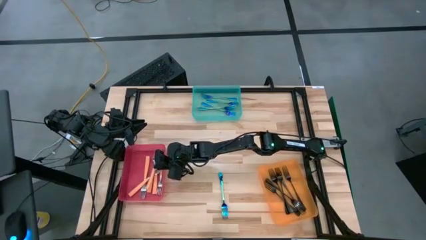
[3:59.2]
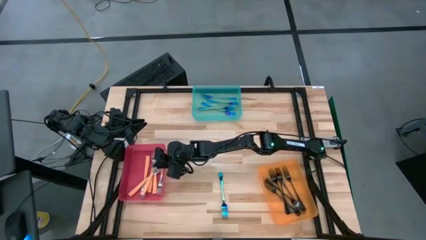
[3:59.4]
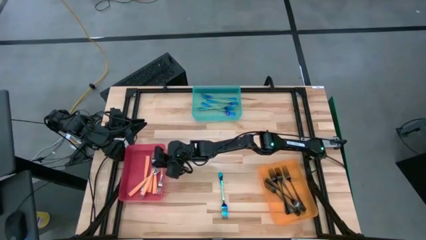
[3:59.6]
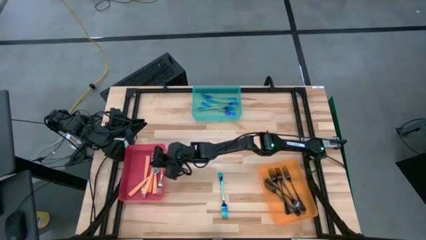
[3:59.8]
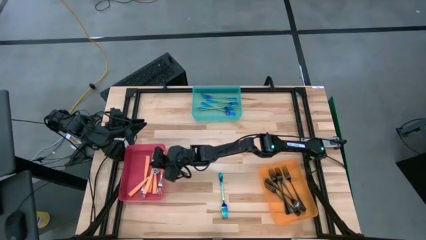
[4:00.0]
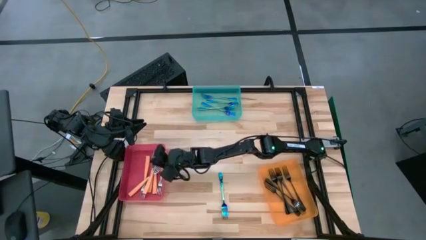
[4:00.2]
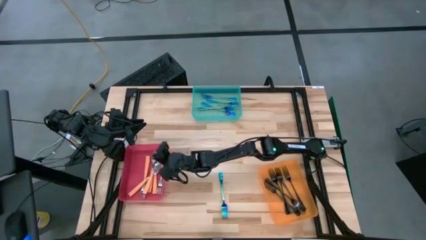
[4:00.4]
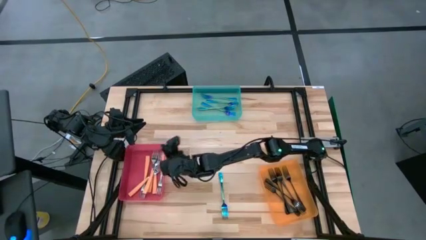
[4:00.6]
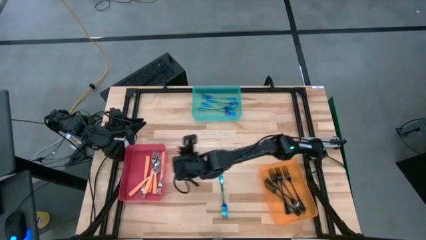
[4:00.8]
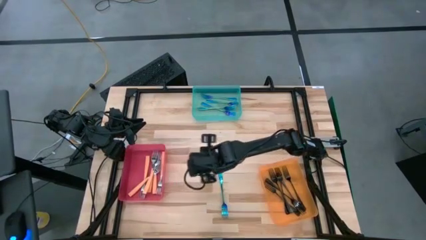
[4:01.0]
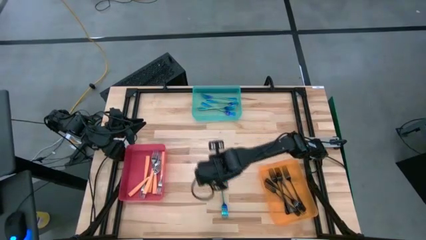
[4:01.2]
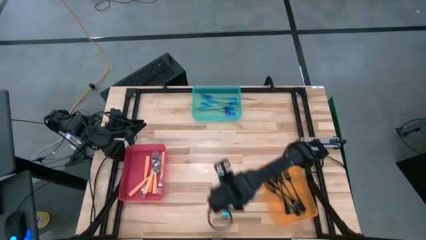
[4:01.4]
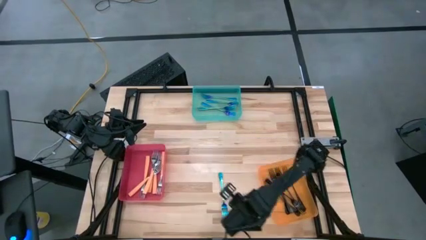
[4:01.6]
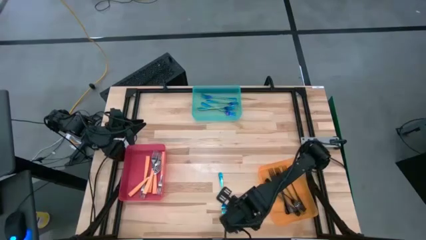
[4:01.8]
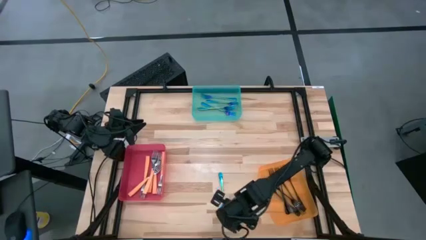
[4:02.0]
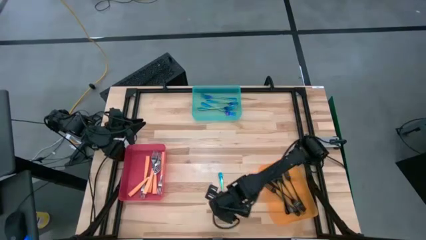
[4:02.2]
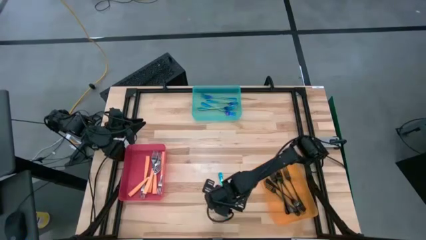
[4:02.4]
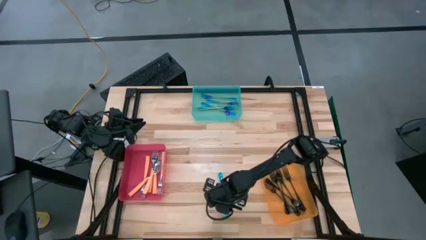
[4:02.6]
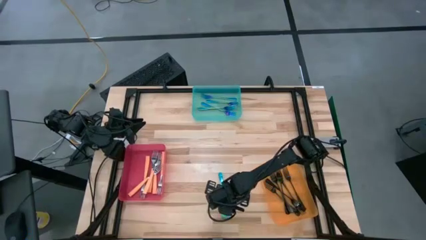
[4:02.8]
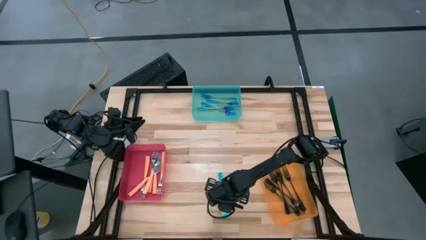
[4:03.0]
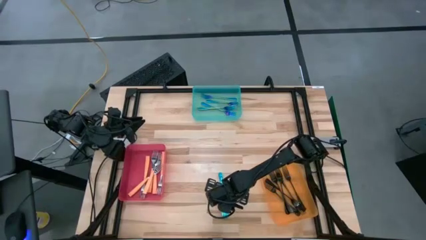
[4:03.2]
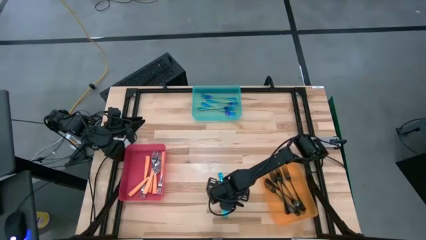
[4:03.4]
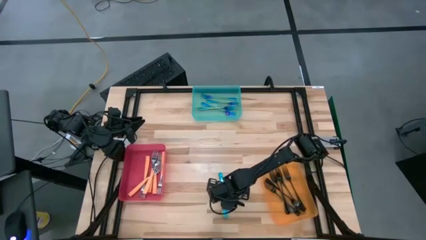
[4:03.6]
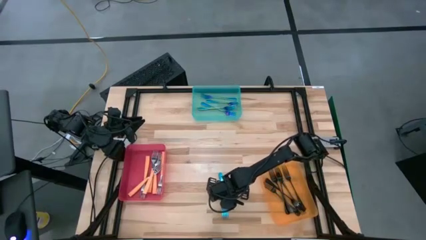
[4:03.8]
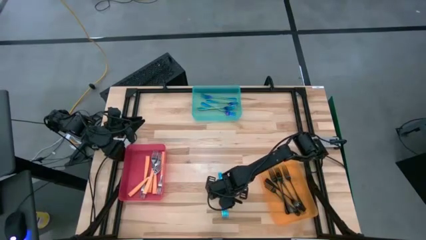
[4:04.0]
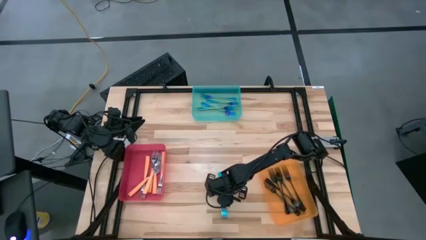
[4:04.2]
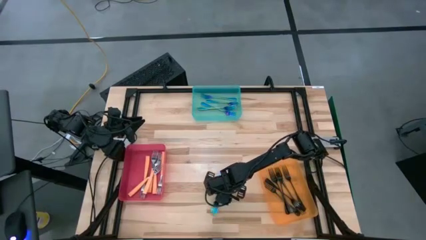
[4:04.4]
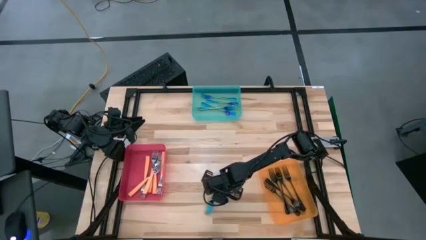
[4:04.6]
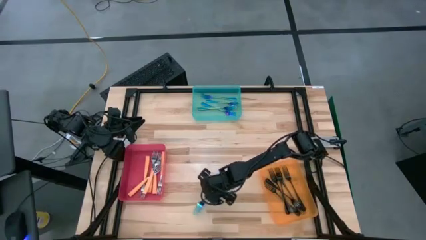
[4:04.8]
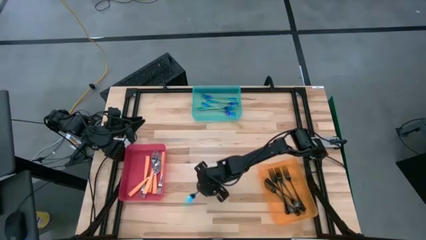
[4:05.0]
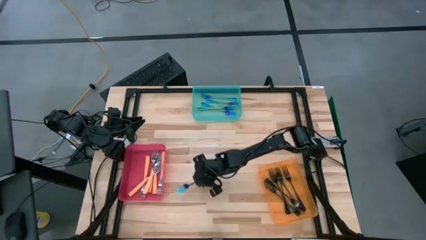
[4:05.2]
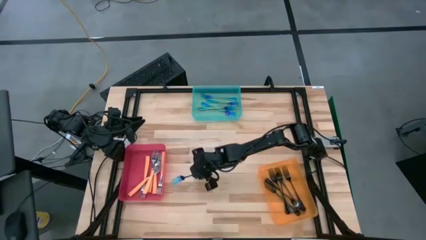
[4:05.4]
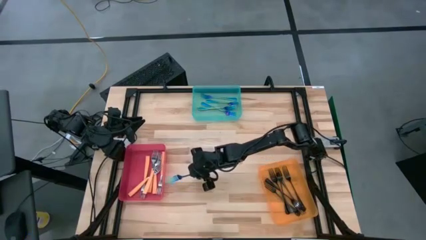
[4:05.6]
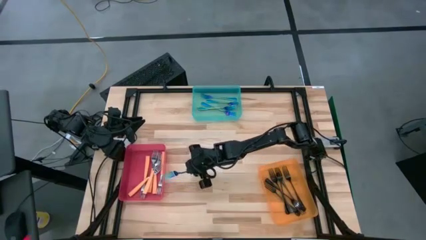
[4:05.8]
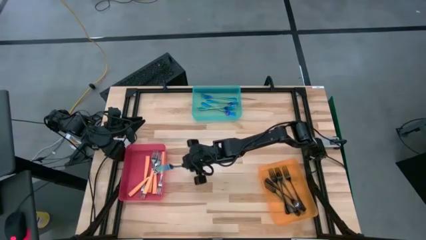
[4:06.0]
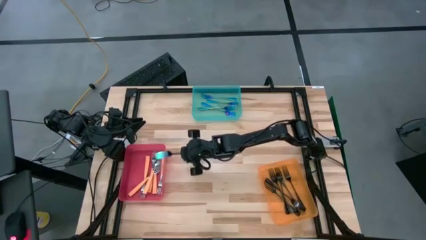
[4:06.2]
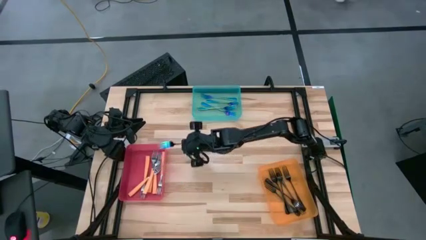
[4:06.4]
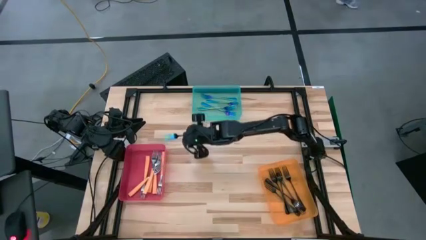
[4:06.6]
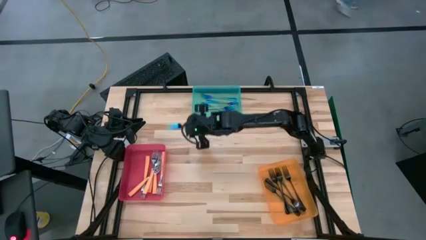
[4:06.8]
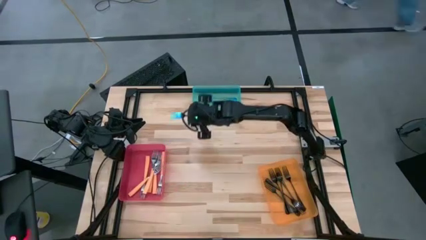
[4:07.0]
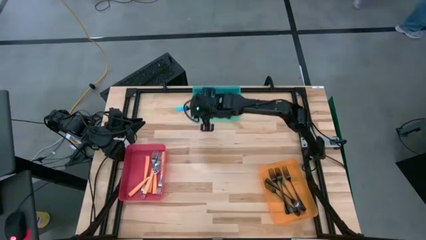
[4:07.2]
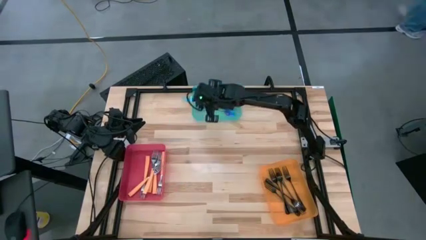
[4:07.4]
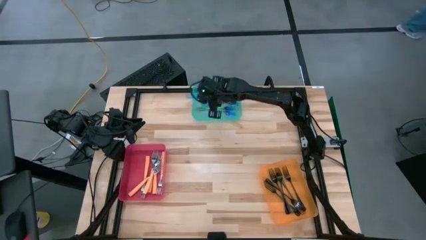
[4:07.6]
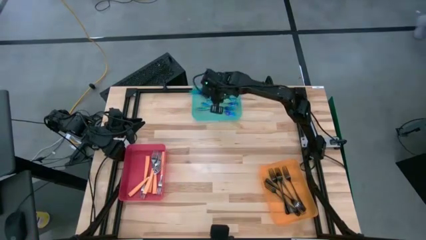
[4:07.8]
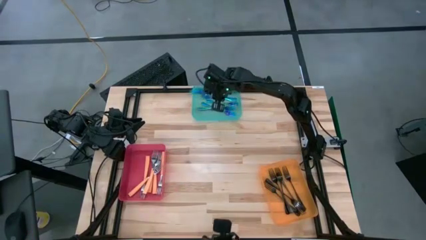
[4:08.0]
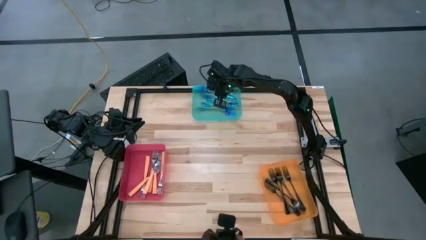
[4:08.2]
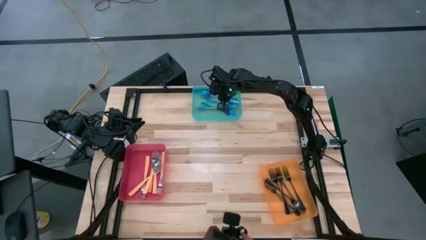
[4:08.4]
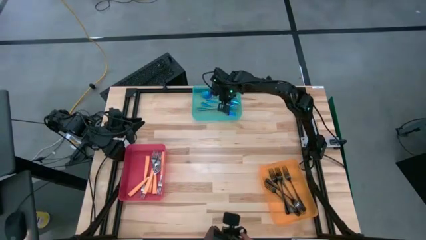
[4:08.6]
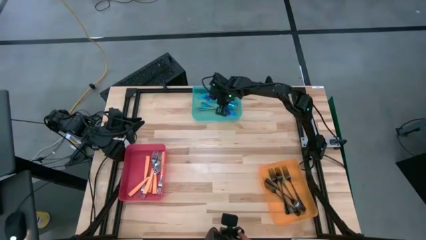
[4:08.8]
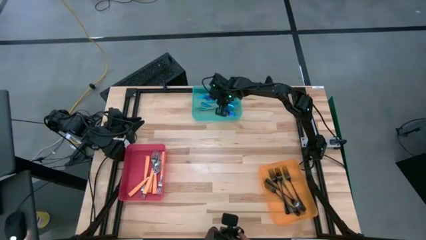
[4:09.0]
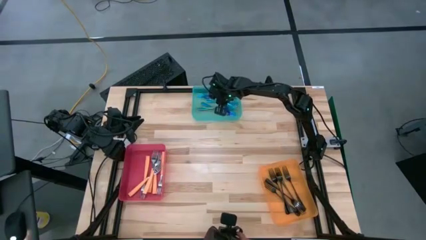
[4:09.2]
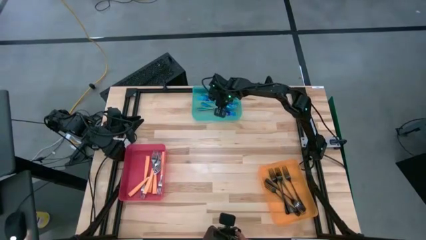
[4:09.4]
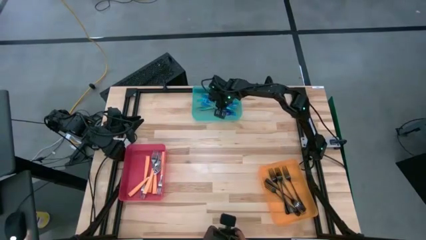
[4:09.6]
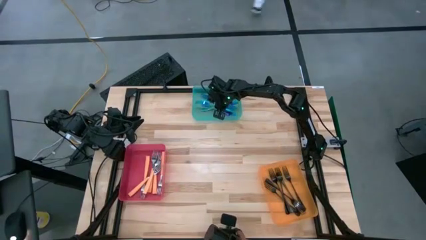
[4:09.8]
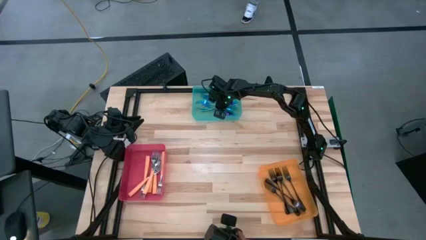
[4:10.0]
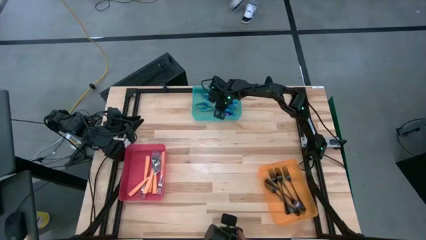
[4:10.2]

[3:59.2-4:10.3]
Task: Sort silverware by color (type)
Put the blue fork into the blue bin

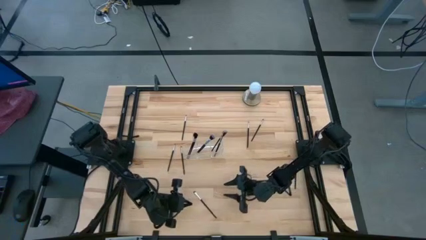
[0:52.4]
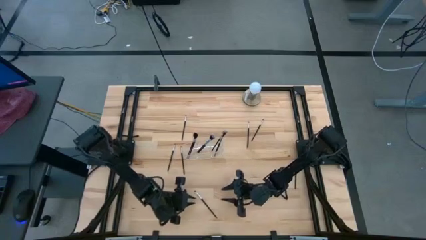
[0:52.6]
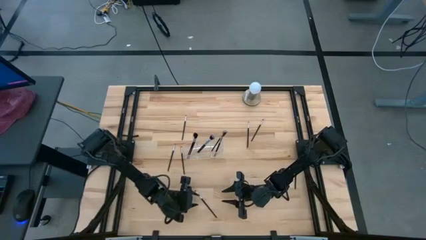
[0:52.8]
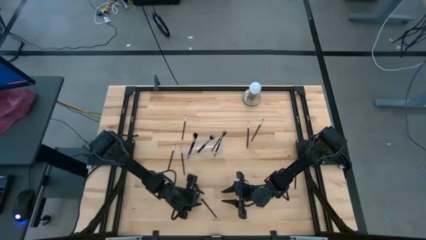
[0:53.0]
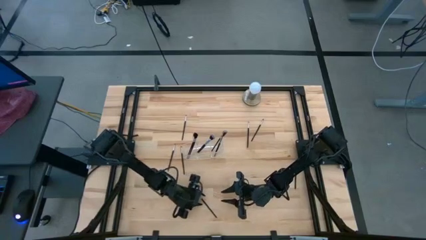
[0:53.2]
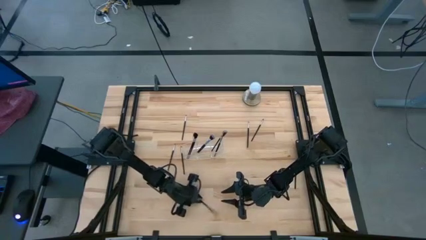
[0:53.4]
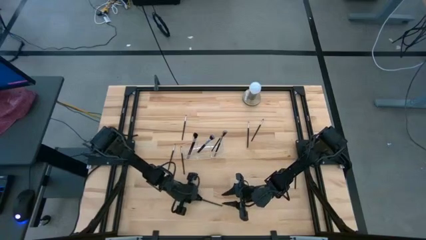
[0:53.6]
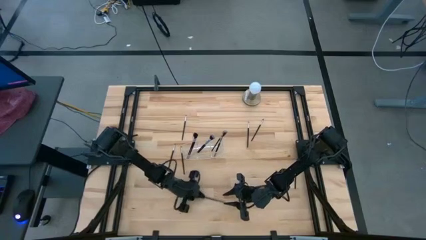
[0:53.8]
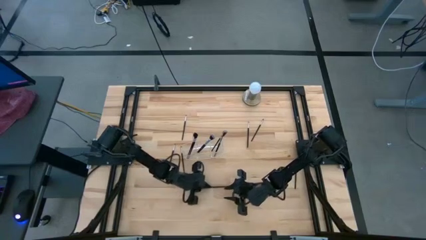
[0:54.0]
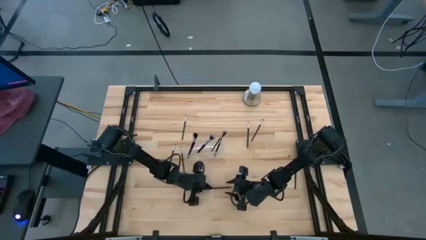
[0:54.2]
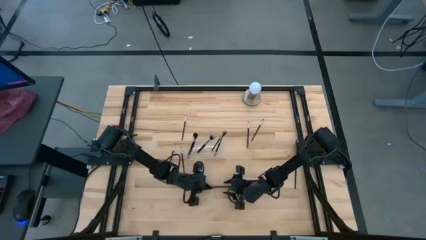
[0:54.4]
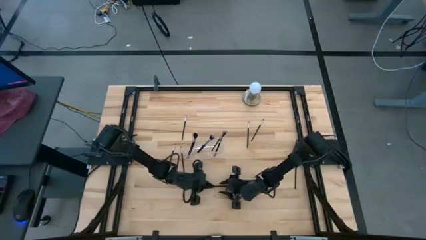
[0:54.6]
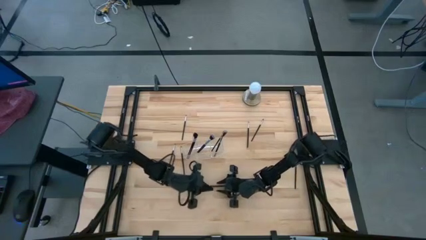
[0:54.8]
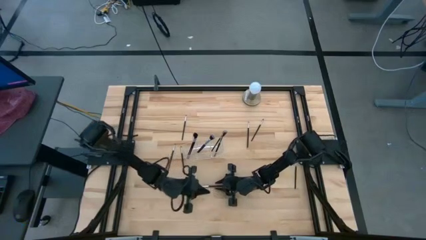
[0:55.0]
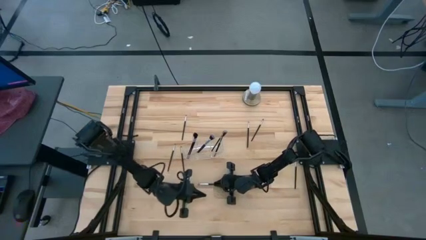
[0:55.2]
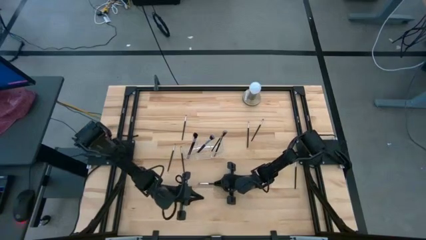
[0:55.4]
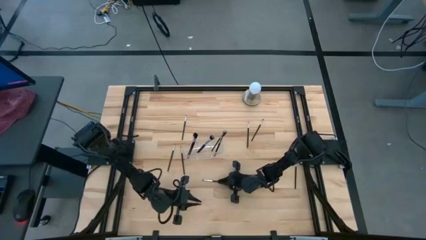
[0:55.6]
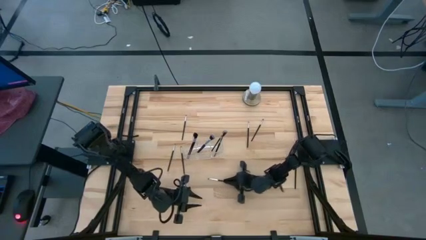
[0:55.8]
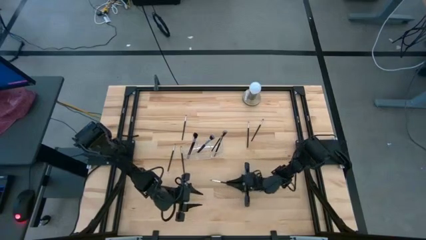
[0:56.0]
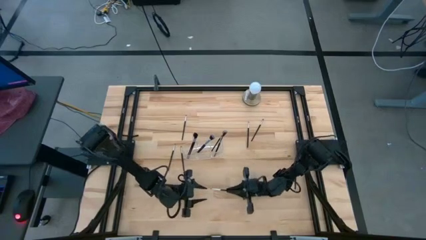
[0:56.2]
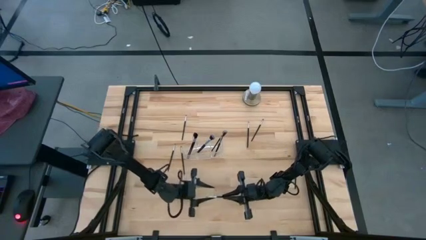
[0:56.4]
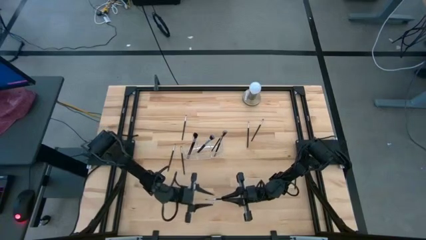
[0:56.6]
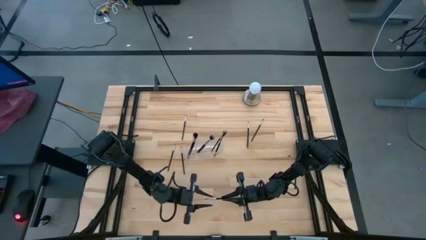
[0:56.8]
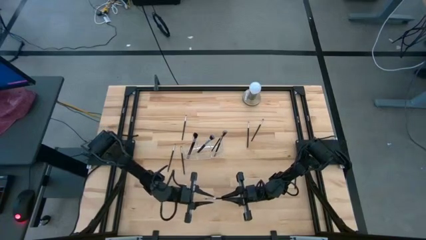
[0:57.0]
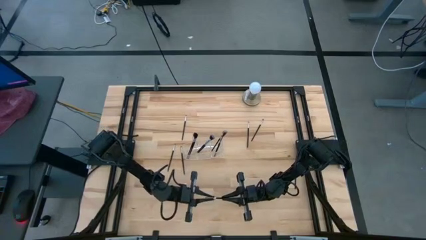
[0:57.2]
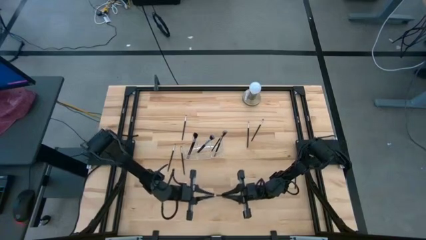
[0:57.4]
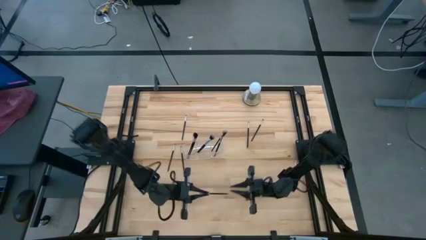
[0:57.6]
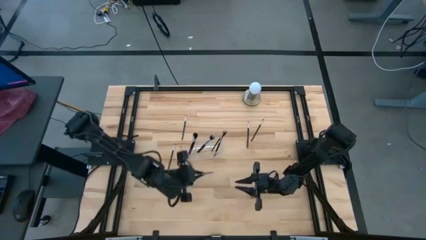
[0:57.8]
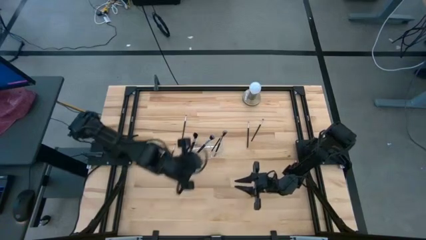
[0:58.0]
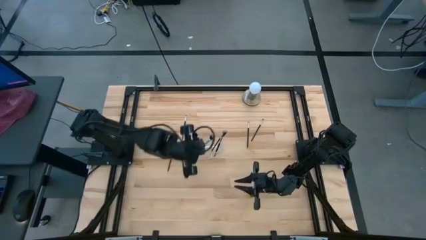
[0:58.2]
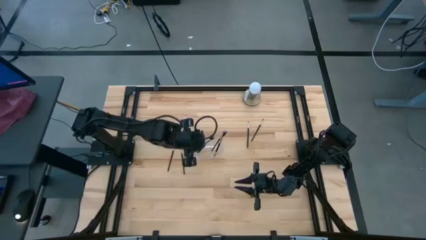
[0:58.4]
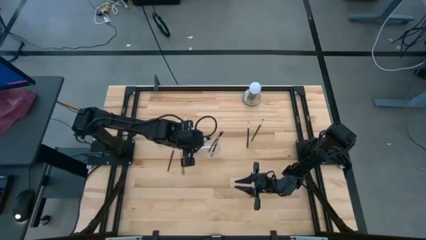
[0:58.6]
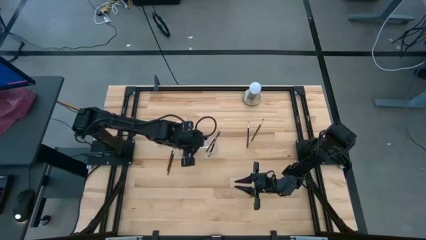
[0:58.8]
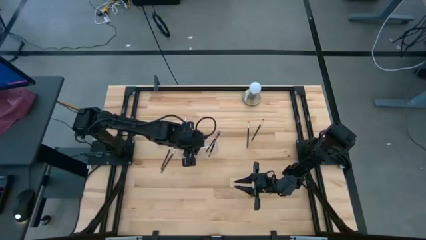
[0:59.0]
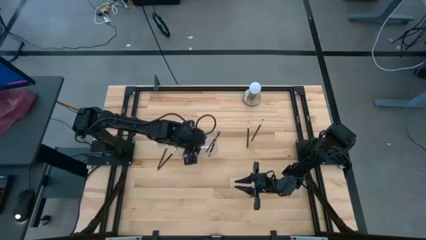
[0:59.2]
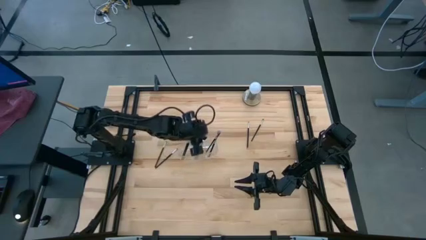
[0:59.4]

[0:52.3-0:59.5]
Task: Put items in baskets/containers
Put the eyeshadow brush into the transparent organizer
